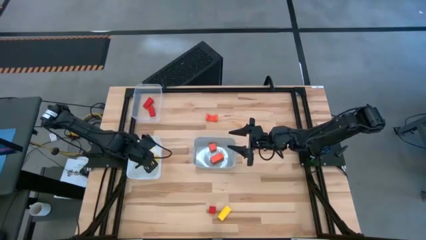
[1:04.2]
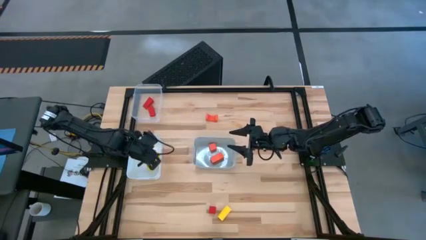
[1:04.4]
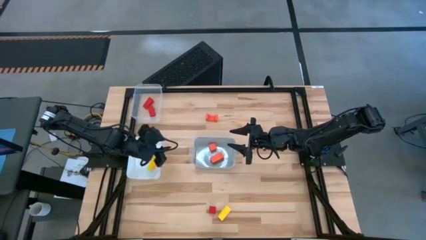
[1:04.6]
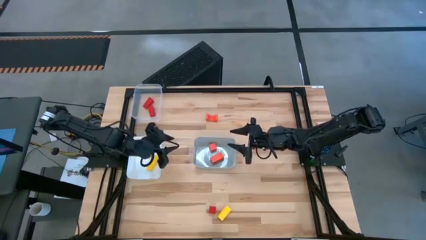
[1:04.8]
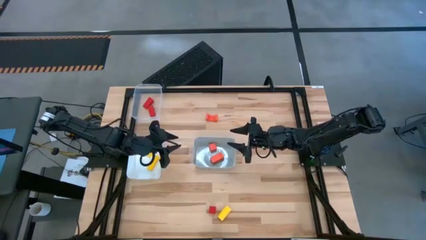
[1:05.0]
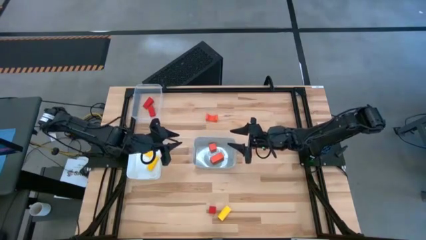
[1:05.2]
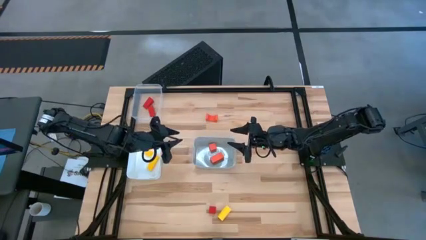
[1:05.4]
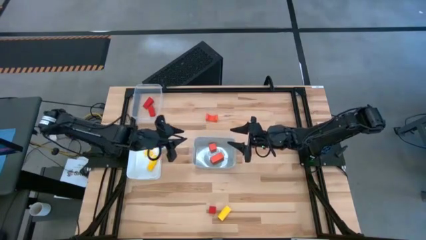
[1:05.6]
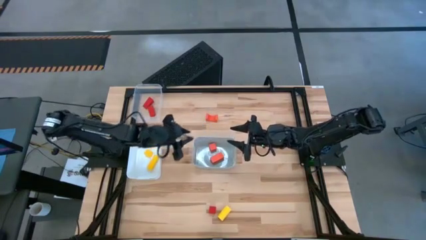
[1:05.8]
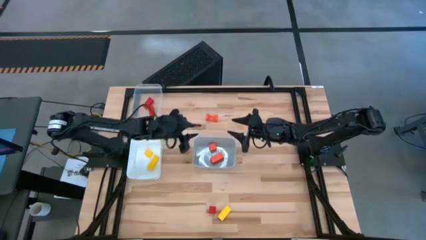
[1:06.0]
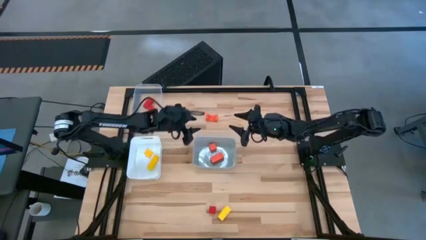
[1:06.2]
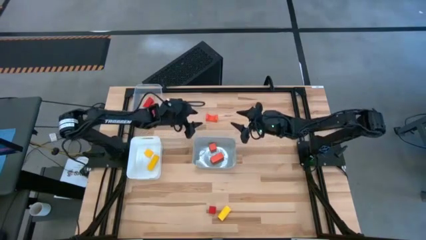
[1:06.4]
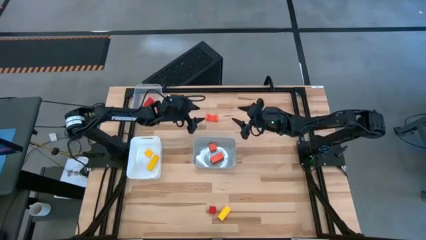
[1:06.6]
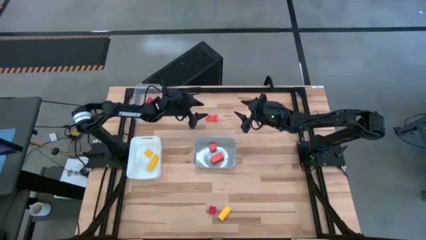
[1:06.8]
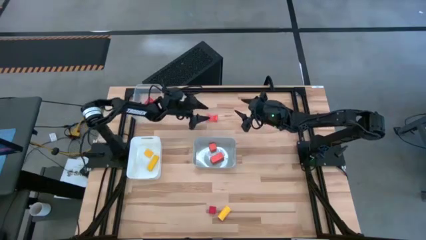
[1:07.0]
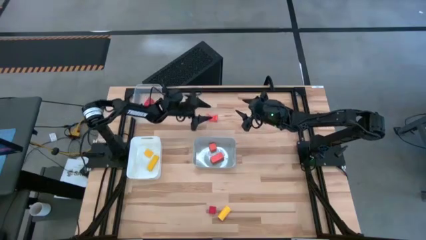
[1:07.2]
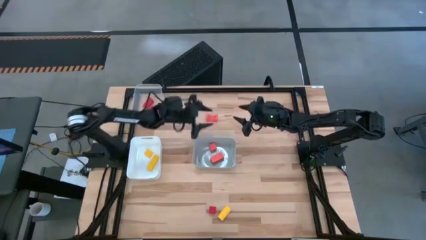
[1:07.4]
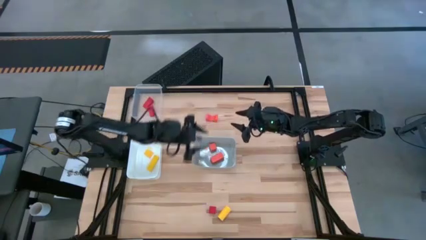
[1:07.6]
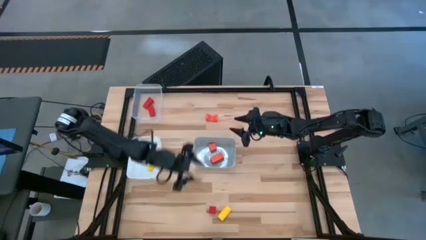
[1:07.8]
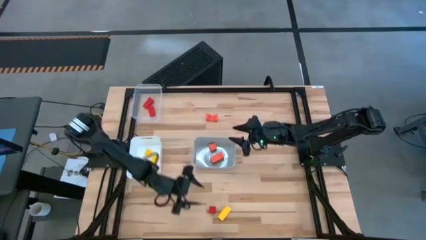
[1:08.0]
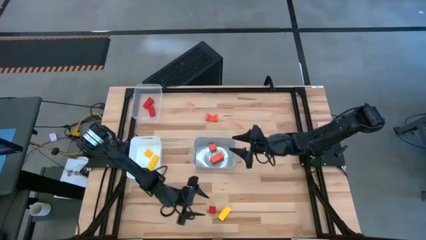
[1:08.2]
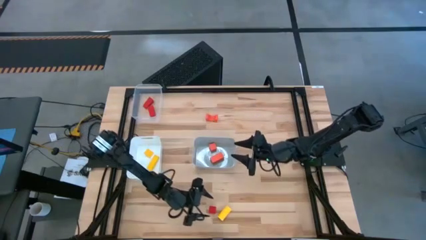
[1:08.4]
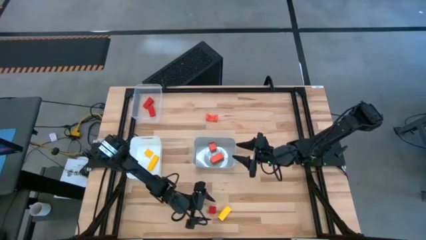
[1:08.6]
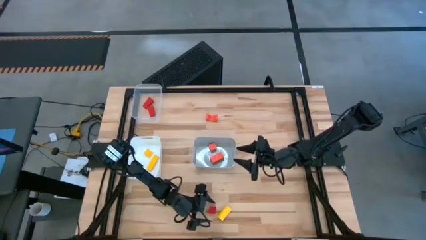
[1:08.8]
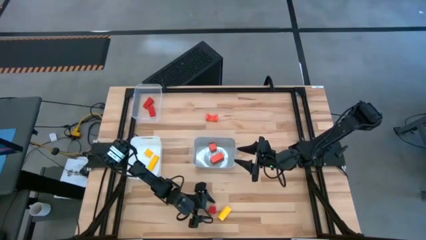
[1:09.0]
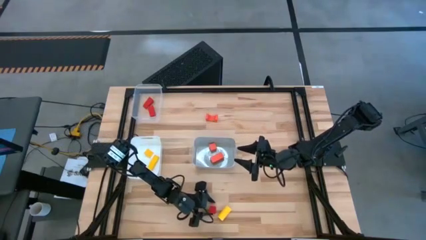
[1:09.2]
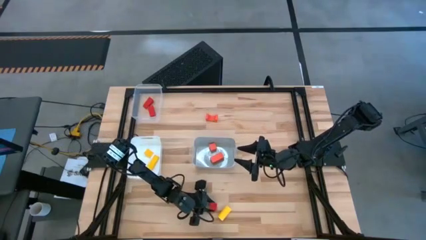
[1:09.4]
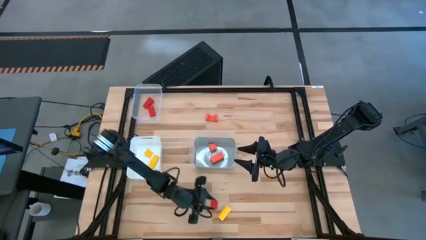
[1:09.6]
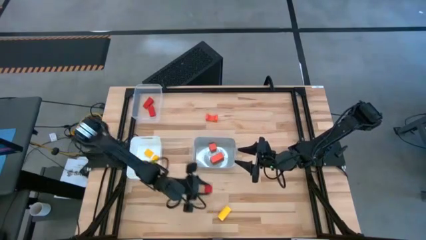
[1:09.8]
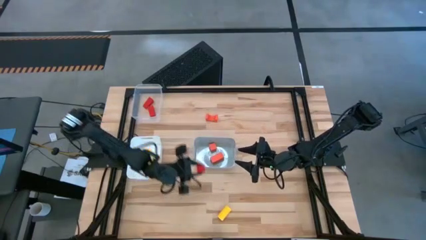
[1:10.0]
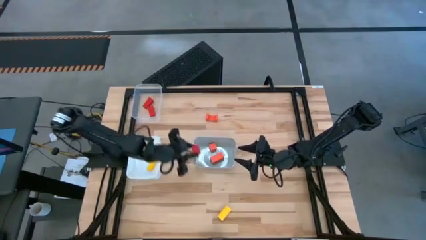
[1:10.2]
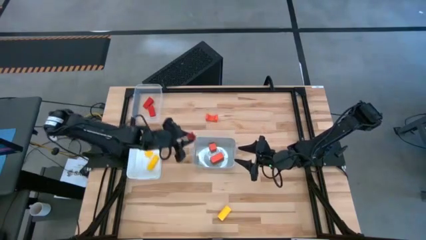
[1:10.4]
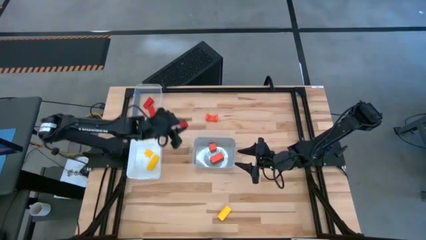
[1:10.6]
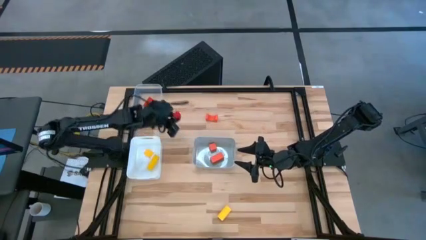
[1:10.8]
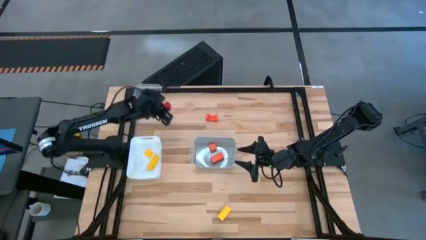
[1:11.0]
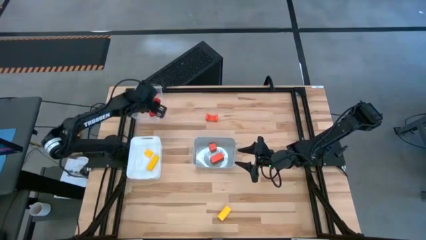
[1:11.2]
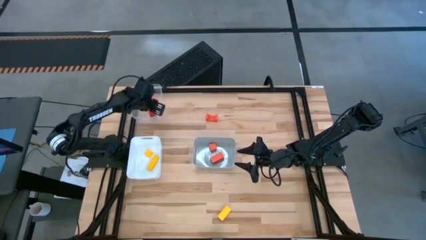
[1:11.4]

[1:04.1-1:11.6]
Task: Sort & place blocks by color
Put the red wooden block into the transparent bin

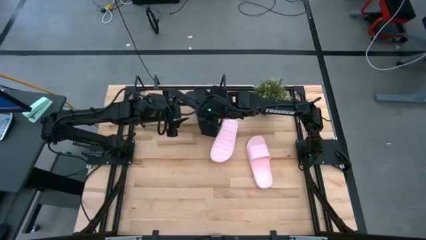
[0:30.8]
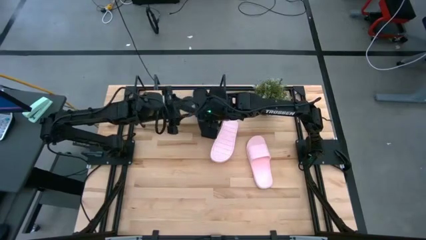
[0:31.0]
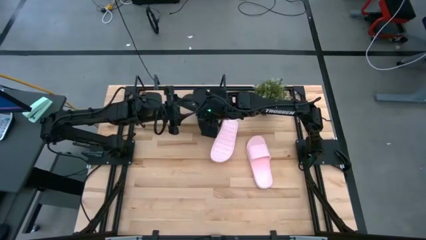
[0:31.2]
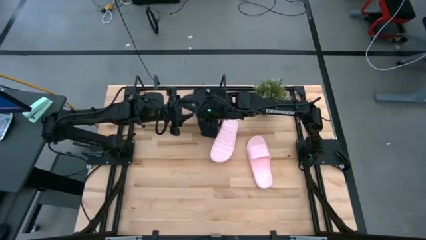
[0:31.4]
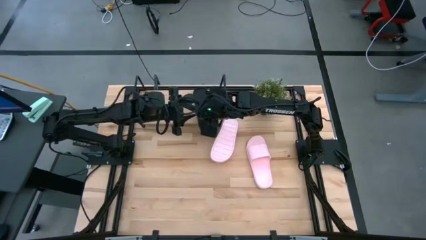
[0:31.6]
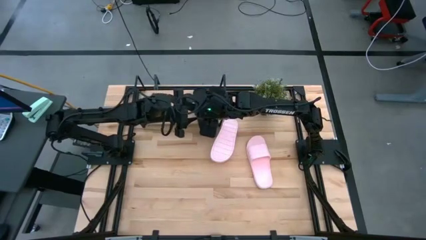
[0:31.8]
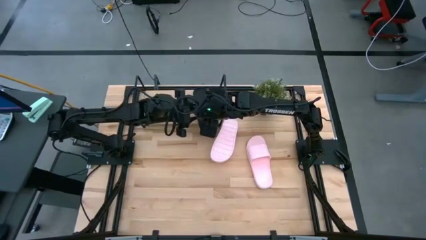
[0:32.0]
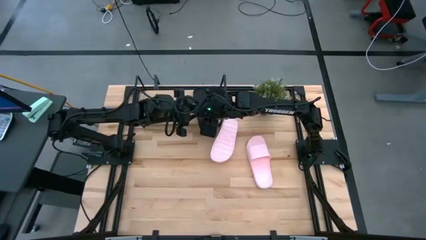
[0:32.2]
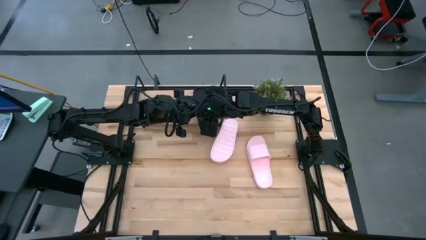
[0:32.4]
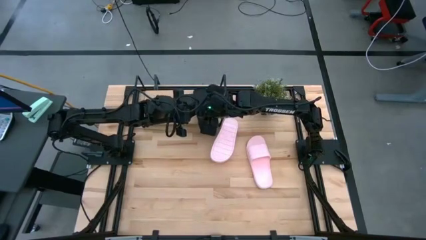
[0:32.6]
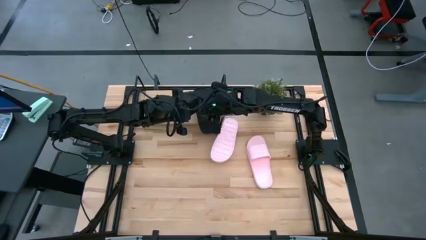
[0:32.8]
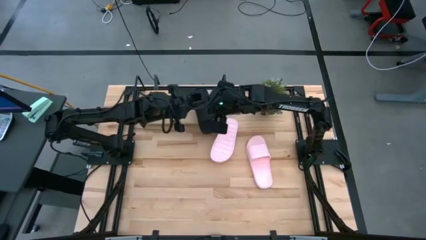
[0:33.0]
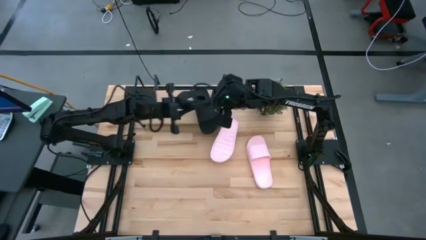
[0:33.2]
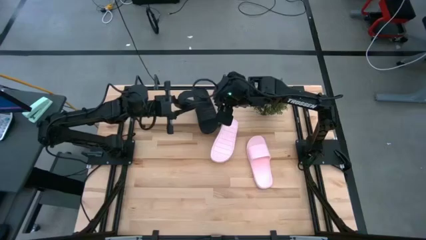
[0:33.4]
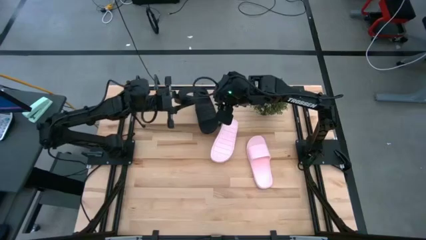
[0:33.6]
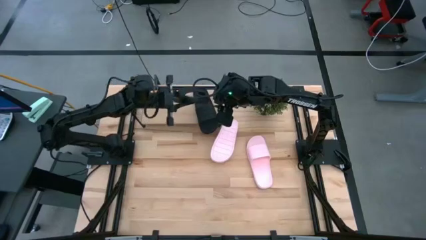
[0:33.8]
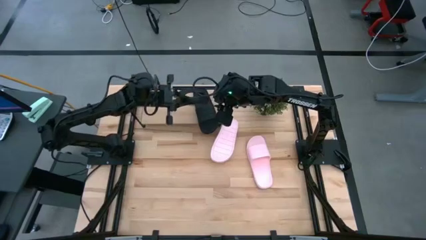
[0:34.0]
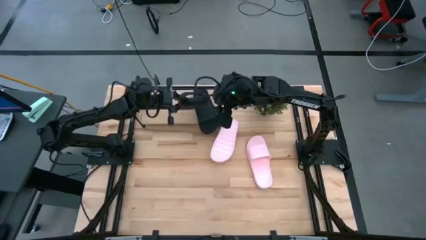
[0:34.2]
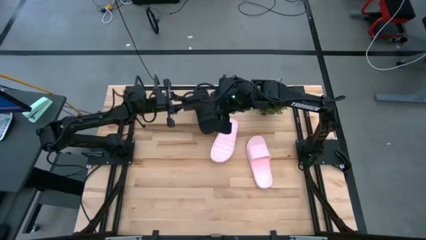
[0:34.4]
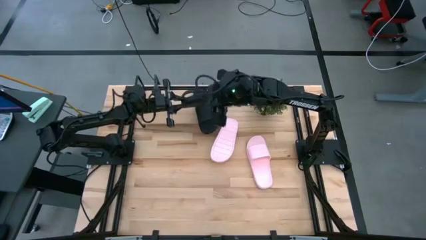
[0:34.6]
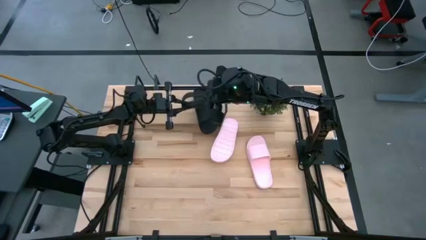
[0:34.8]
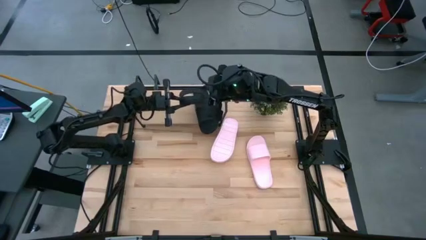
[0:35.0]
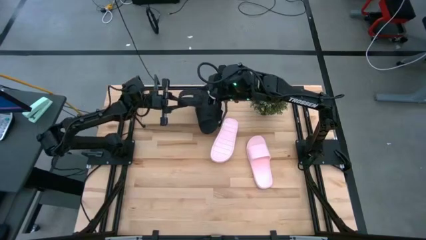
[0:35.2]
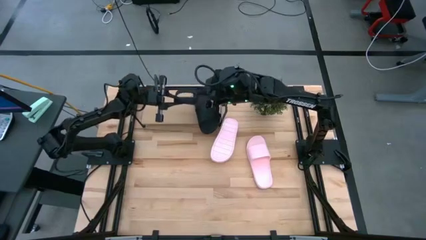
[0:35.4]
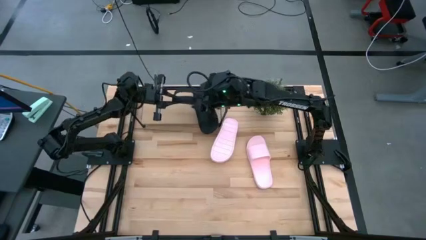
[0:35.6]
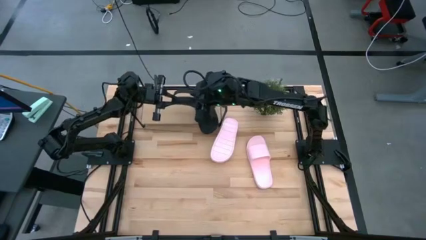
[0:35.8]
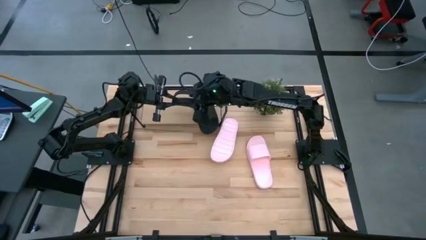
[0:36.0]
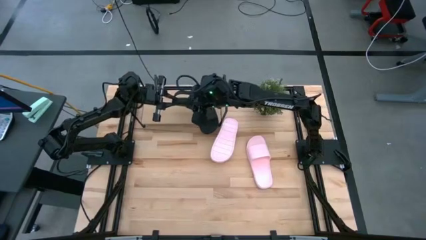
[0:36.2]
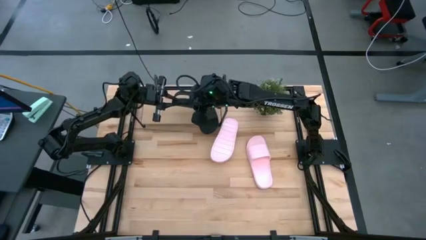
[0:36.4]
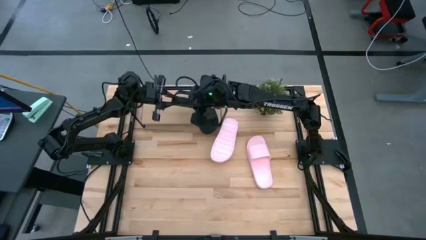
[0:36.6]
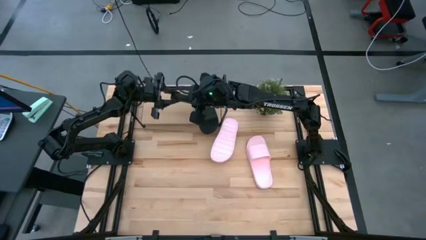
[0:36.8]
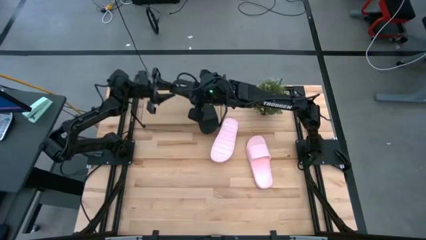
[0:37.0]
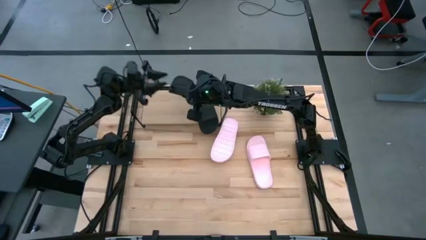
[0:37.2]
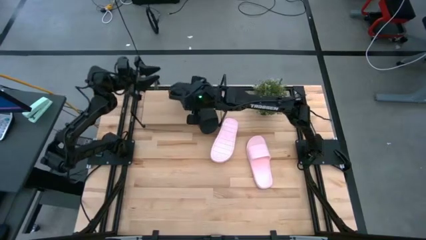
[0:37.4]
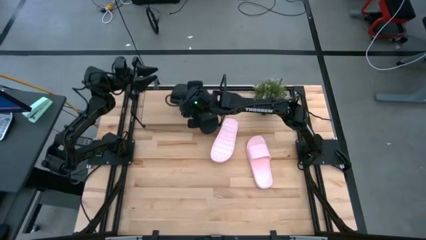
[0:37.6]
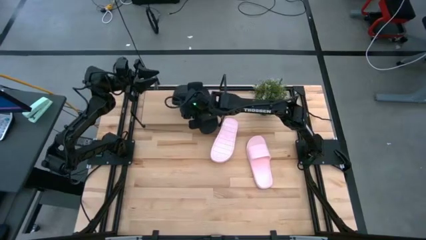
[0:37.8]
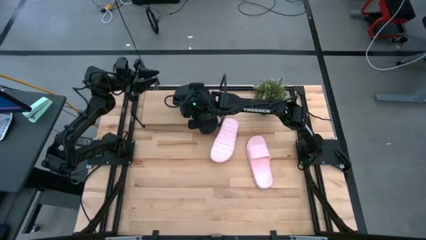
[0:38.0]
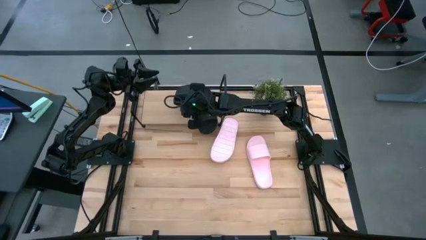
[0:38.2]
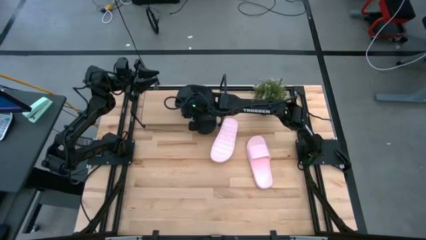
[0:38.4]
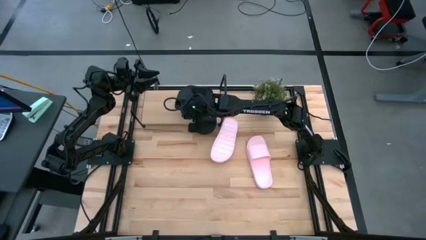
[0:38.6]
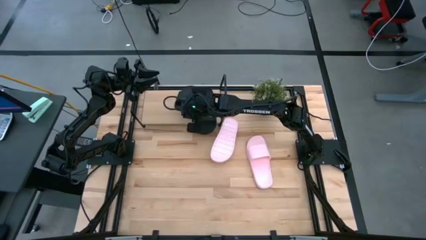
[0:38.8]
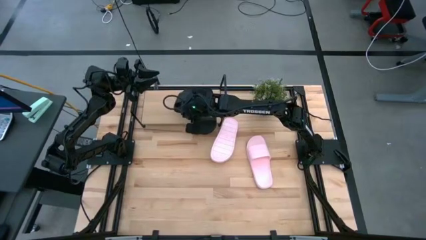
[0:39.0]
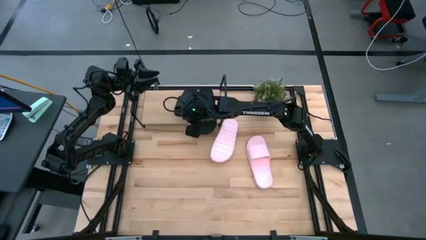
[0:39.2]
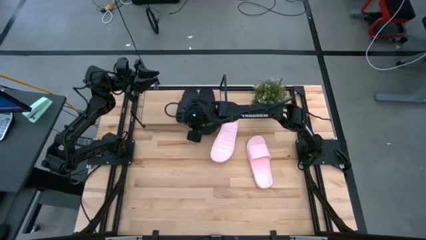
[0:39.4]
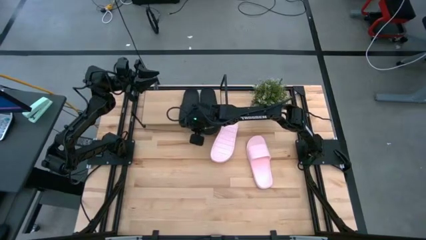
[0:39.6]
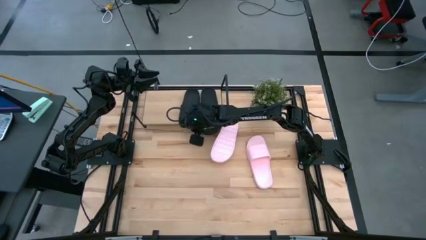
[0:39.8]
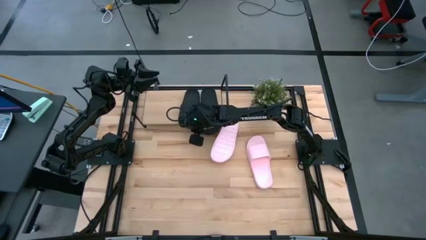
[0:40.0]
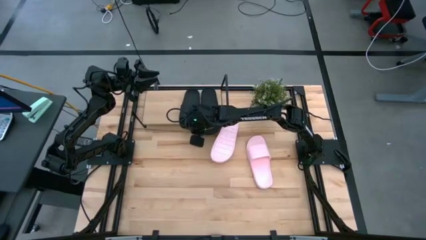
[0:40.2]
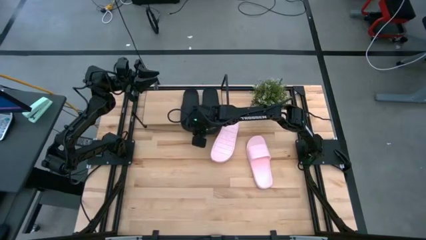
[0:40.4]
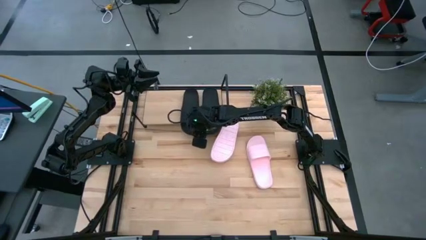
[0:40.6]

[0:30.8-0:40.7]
Task: Pick and place slides into the shelf
Put the black slipper onto the shelf
